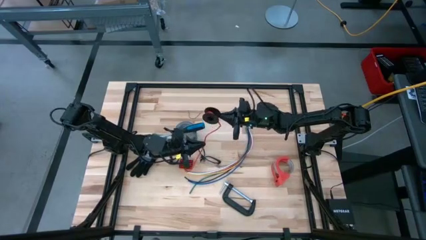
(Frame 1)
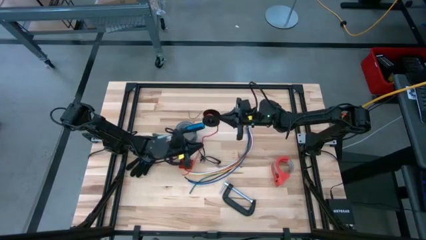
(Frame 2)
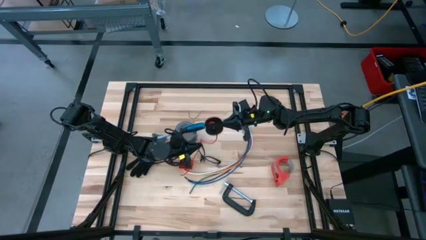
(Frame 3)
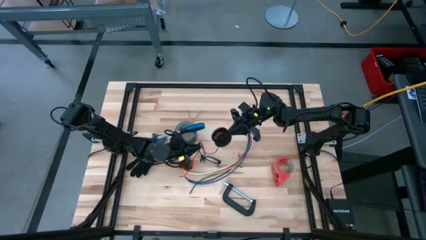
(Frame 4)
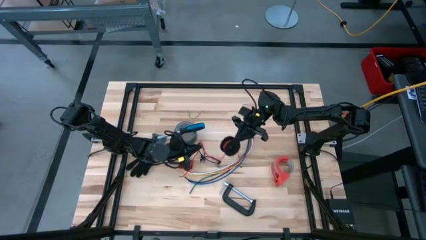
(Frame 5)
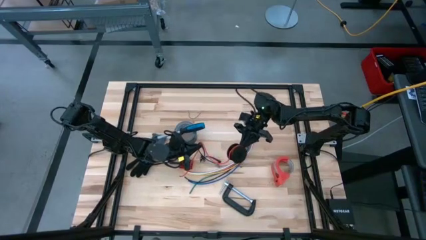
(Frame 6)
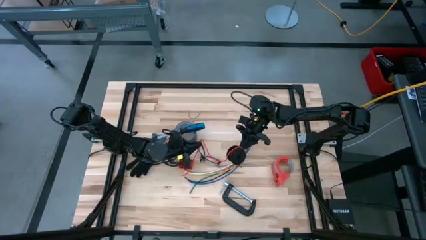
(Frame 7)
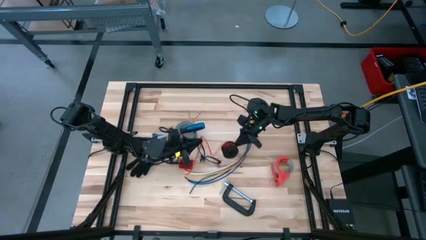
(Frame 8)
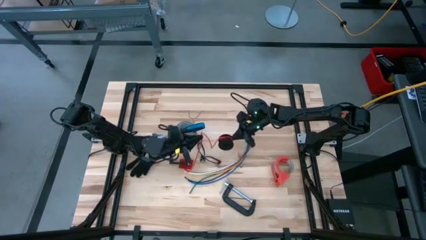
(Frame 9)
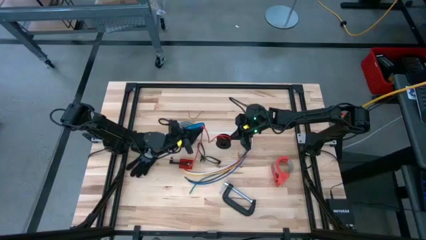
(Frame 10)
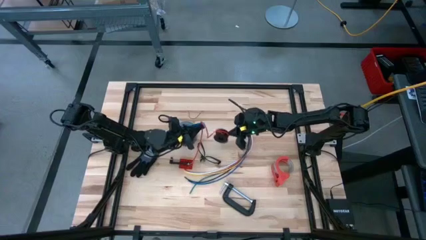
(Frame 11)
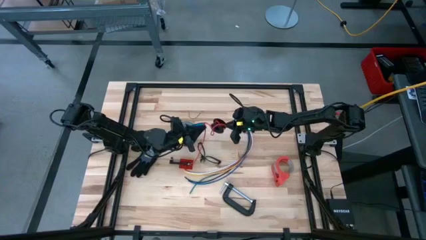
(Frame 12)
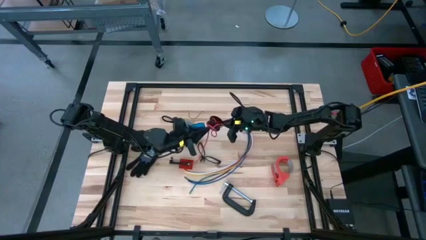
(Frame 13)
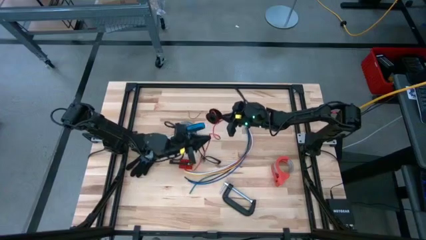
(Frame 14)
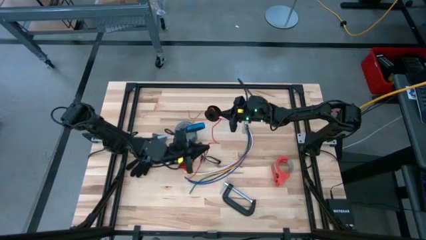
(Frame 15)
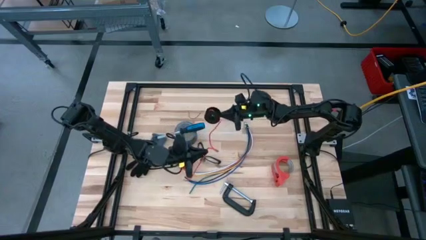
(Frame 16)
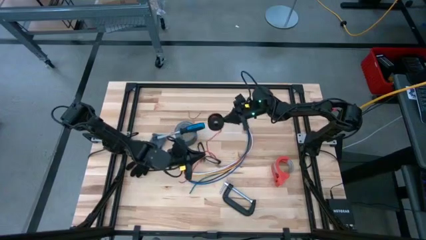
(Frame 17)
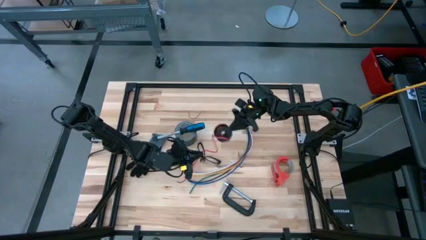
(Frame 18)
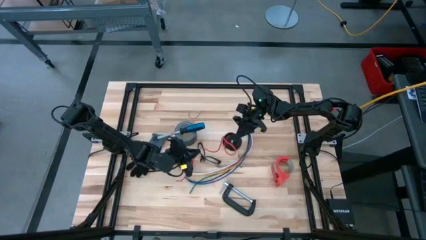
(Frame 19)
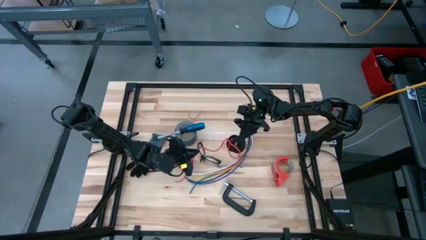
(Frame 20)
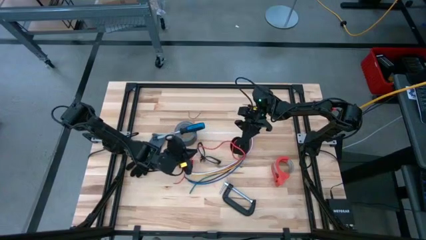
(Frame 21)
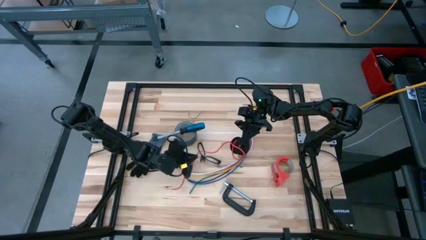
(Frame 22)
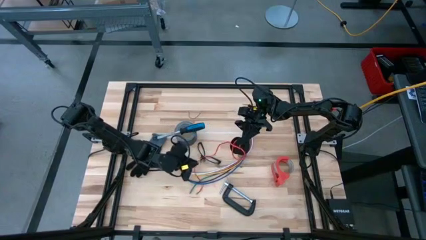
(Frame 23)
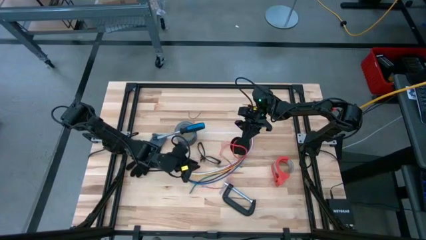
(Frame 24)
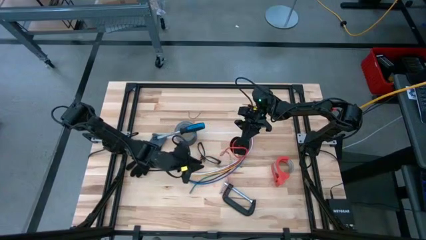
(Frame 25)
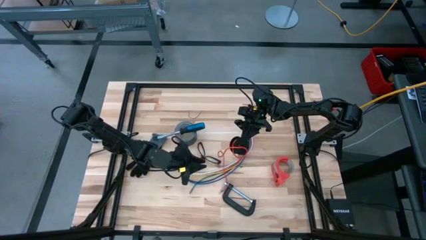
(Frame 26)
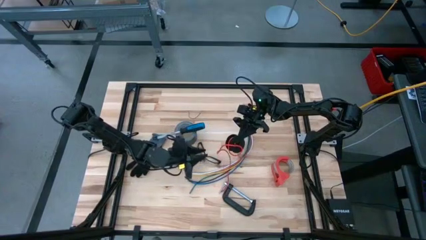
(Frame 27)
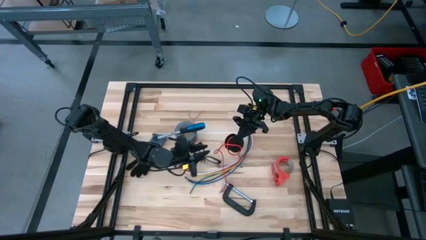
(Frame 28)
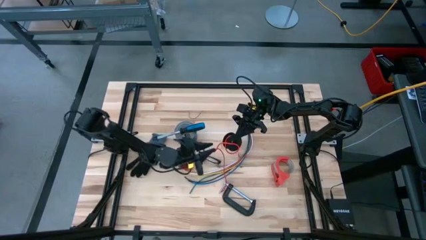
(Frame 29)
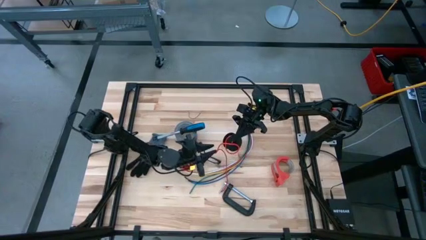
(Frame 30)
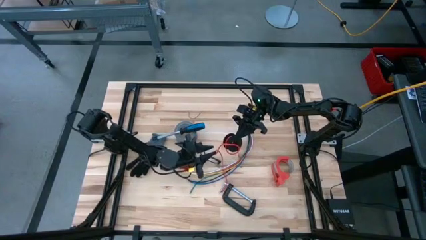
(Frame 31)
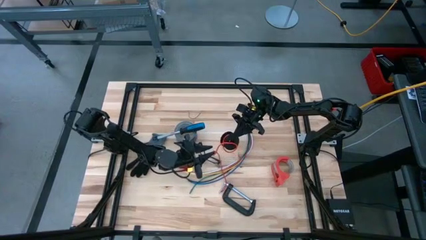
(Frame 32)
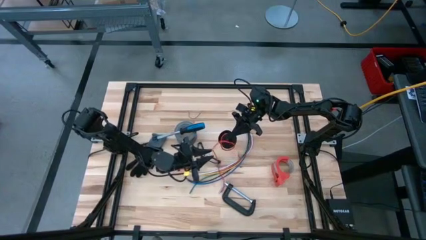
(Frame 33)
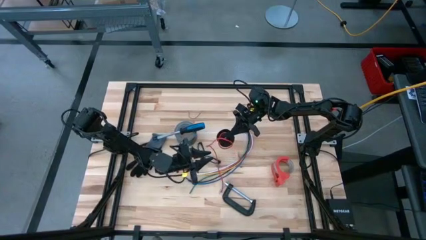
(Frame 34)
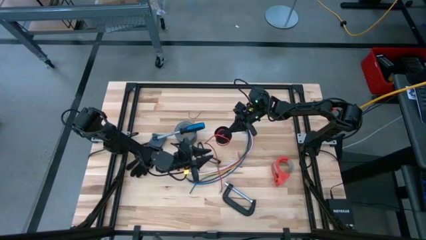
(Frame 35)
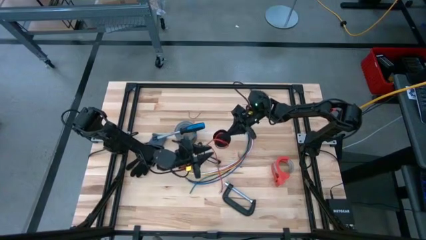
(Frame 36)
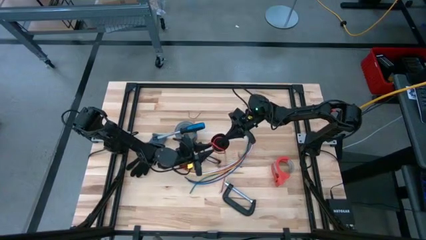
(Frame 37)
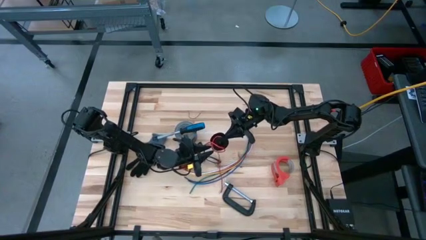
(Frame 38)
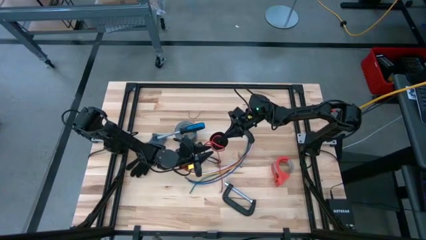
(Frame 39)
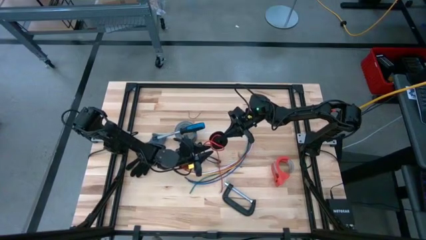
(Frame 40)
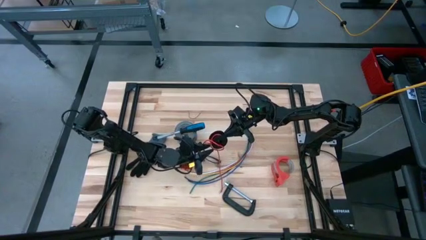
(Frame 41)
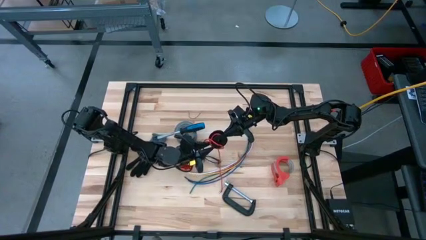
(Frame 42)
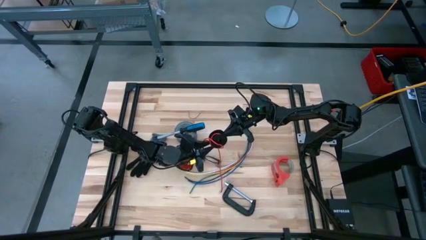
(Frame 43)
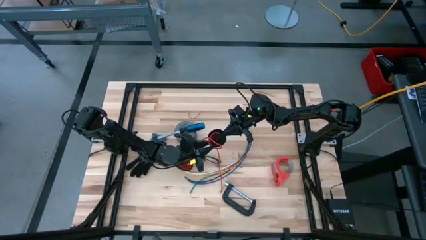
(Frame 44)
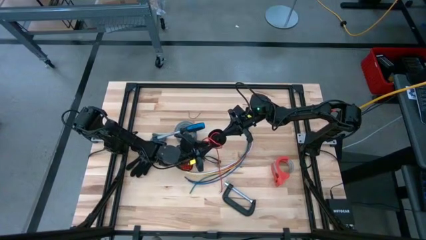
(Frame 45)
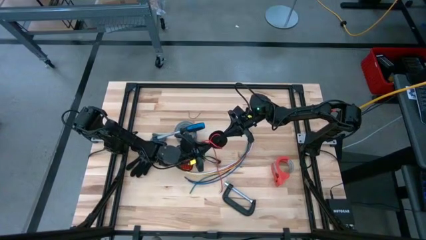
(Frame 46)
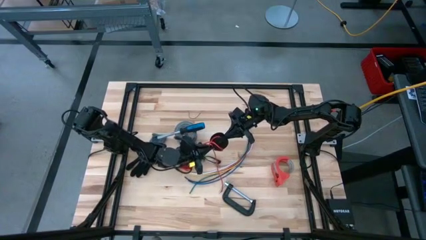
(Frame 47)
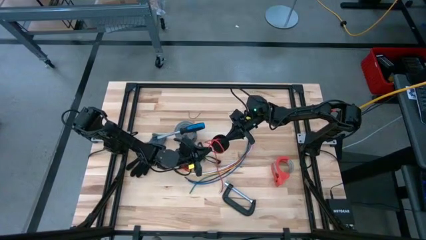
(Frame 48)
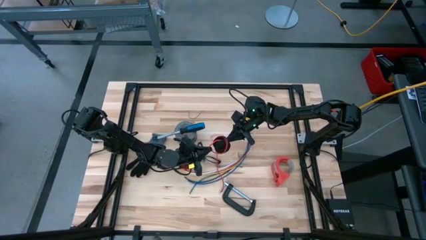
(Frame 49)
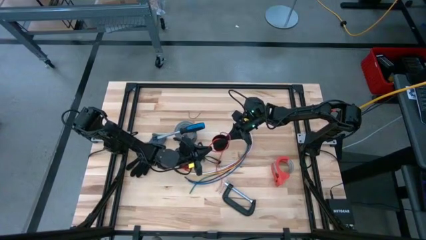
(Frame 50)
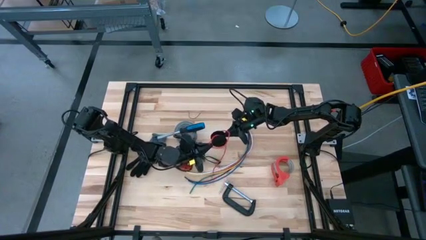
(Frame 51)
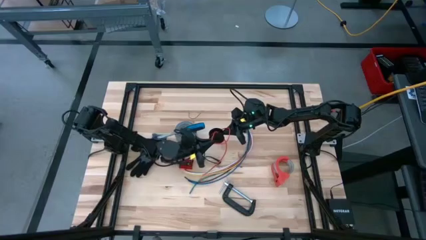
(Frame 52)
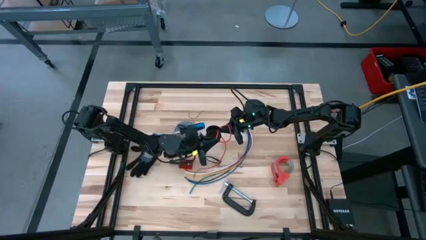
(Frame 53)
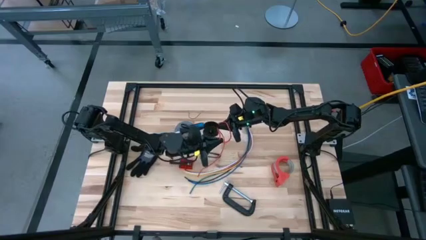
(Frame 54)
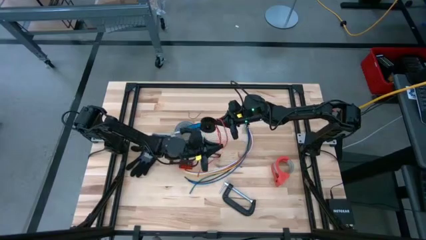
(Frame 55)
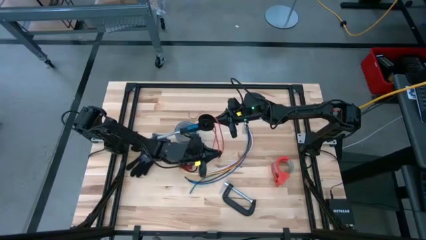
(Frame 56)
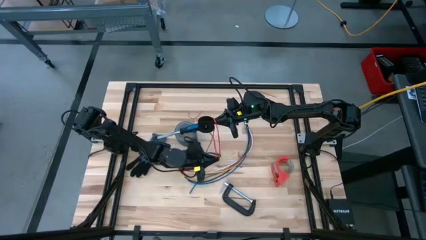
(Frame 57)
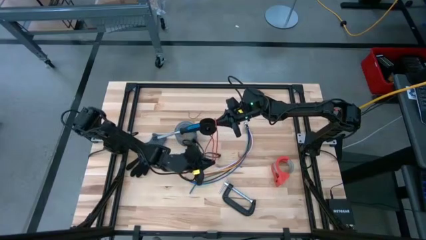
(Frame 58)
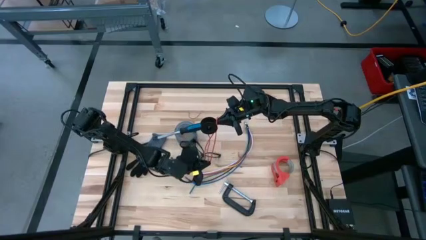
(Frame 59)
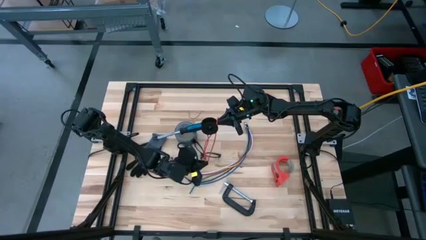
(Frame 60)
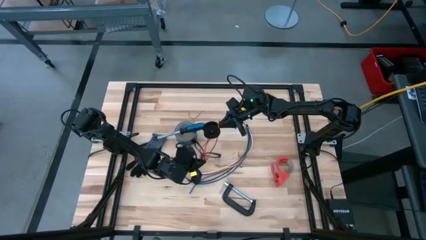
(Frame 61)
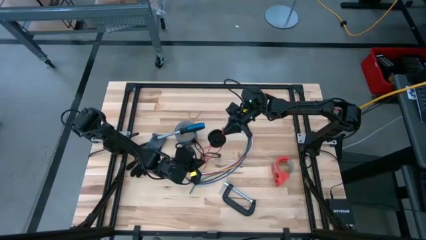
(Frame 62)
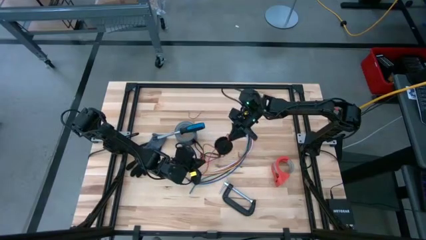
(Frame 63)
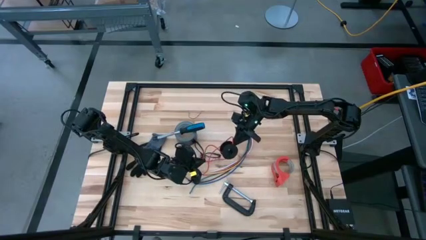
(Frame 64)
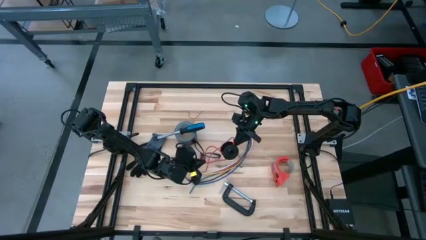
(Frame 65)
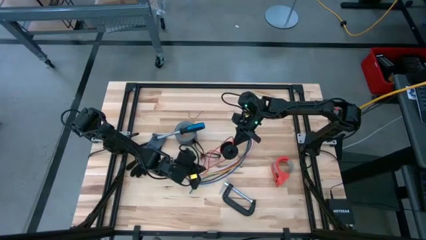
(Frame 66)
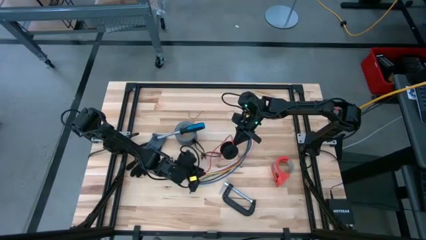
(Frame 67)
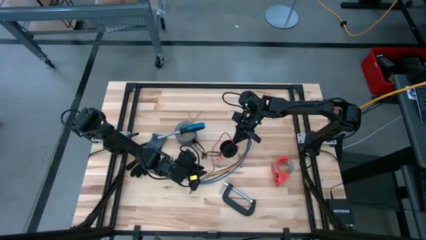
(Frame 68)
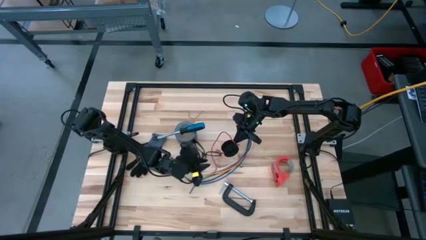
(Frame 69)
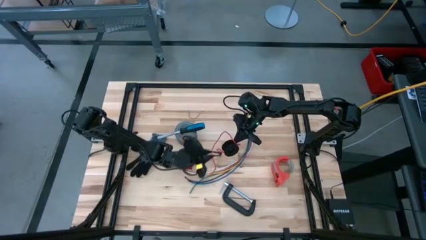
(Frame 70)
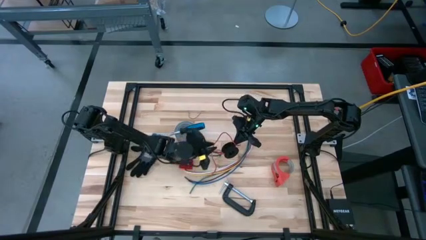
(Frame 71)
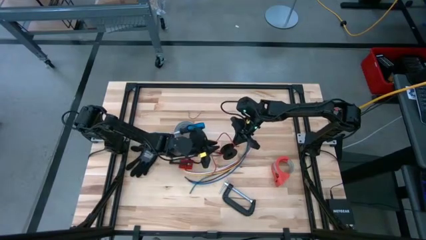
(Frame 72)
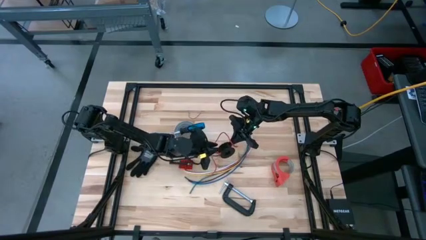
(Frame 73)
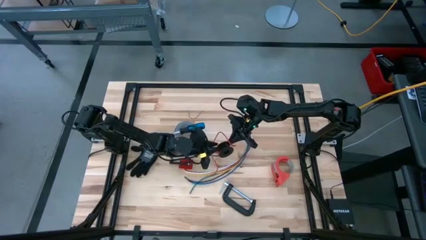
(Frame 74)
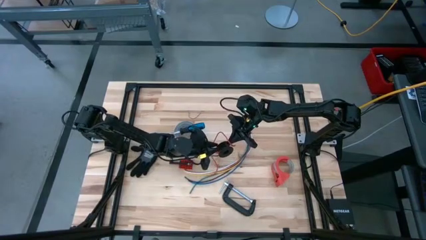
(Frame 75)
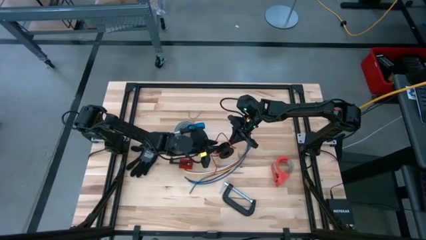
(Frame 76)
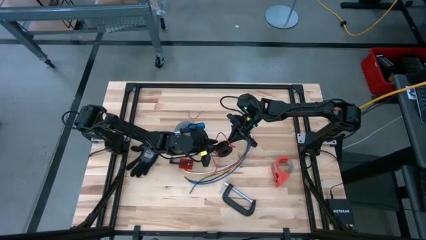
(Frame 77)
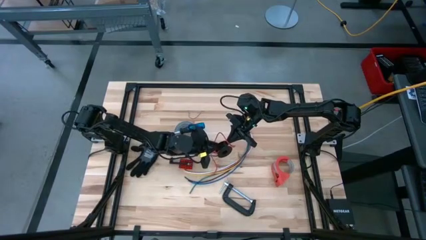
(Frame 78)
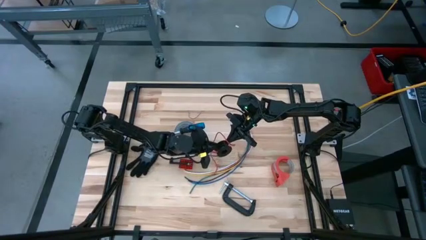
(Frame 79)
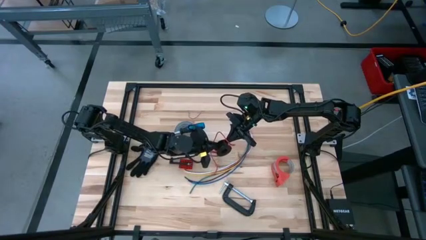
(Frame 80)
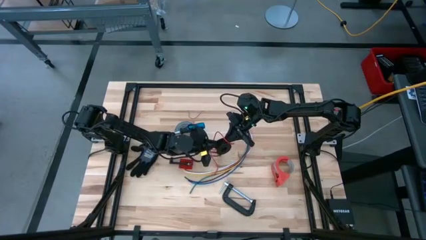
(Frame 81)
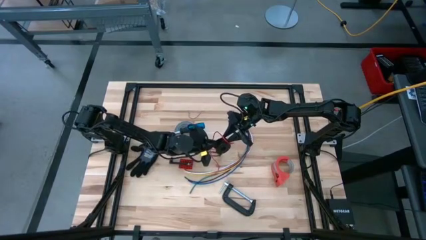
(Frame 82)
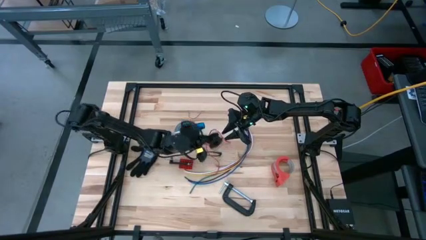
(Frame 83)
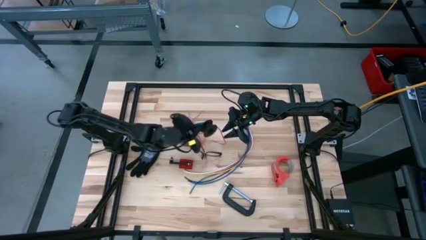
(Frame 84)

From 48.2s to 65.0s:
Task: Coil cords
Uncoil the red wire from the black spool
